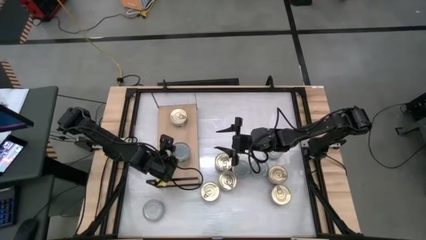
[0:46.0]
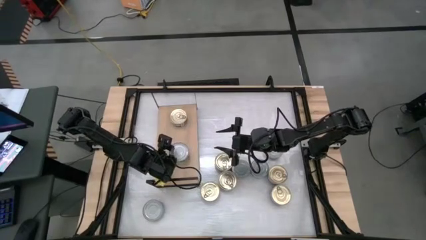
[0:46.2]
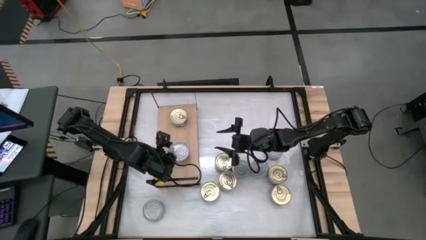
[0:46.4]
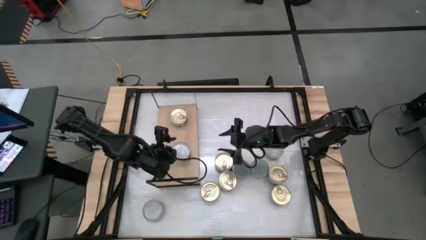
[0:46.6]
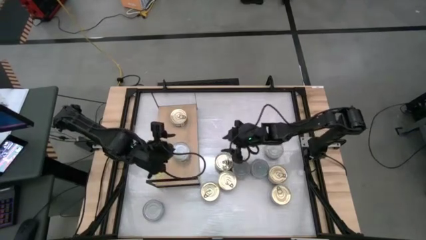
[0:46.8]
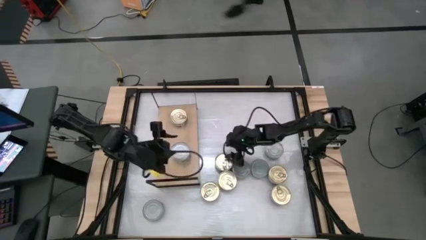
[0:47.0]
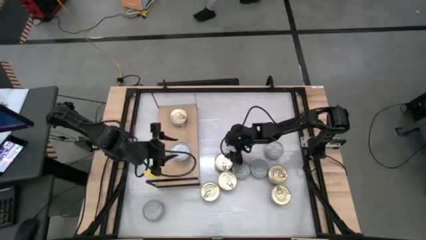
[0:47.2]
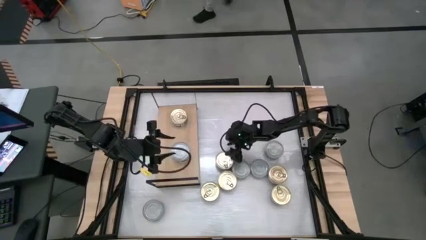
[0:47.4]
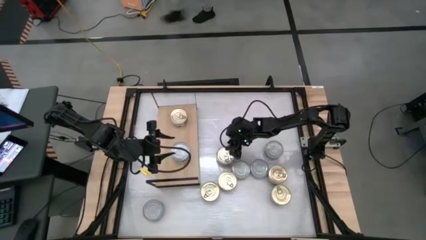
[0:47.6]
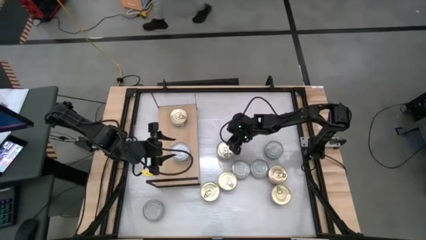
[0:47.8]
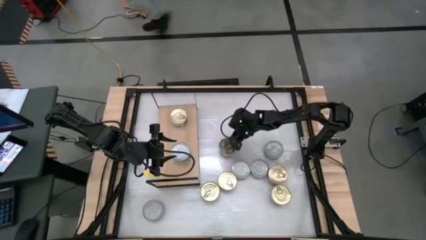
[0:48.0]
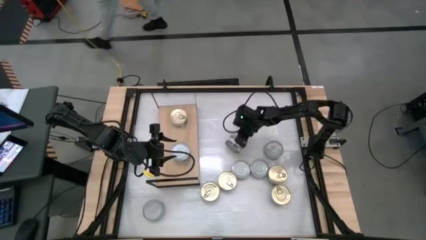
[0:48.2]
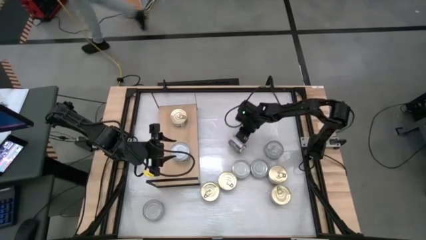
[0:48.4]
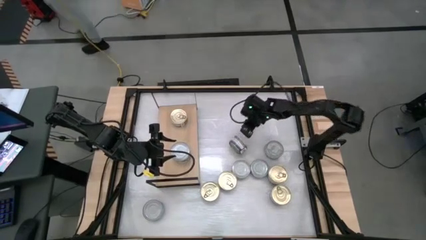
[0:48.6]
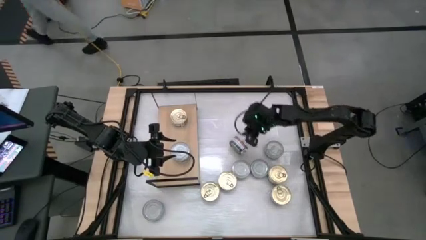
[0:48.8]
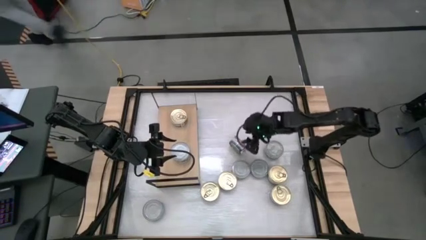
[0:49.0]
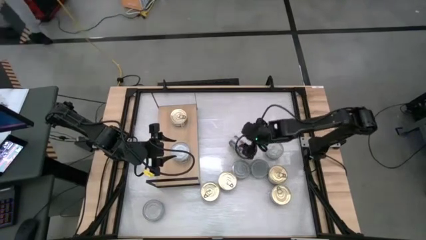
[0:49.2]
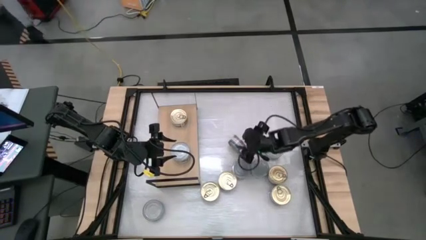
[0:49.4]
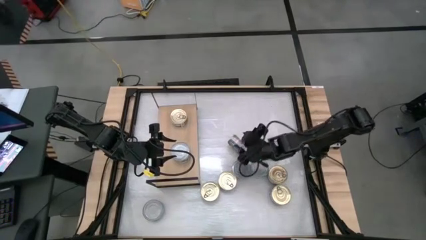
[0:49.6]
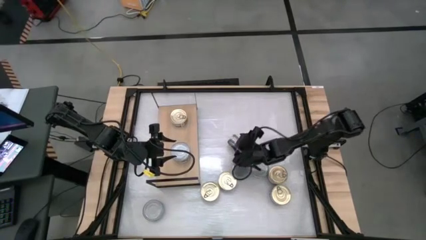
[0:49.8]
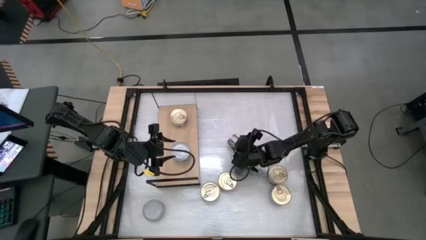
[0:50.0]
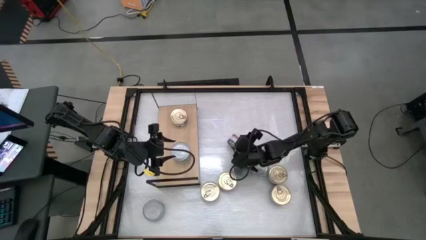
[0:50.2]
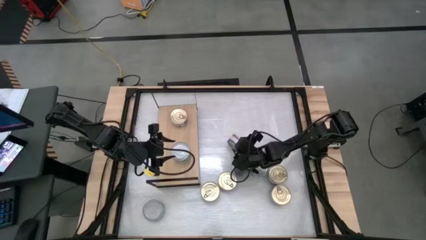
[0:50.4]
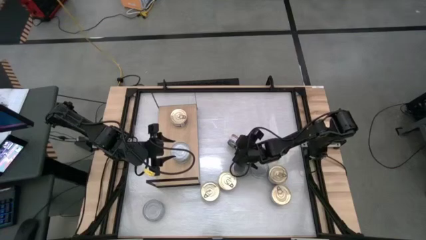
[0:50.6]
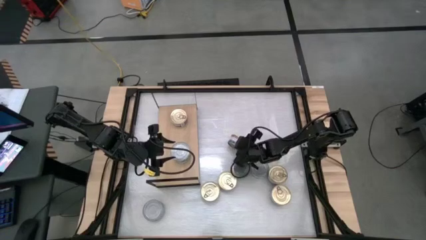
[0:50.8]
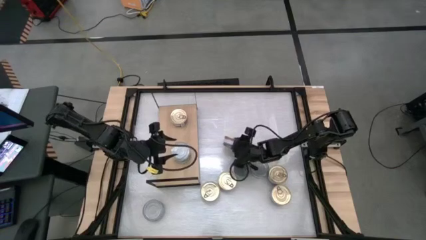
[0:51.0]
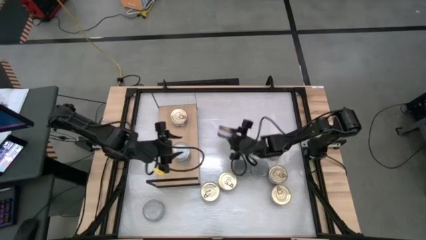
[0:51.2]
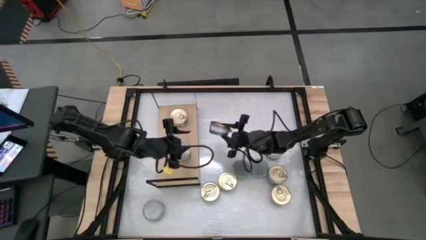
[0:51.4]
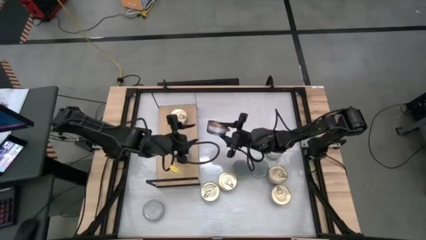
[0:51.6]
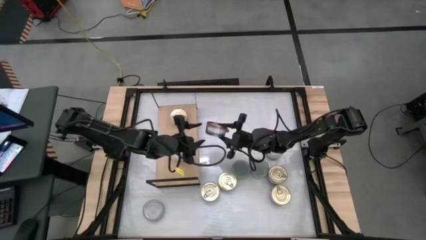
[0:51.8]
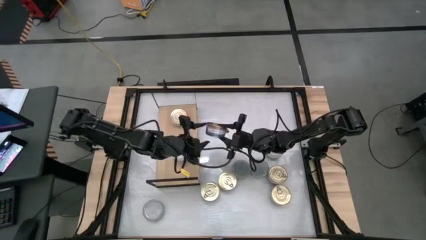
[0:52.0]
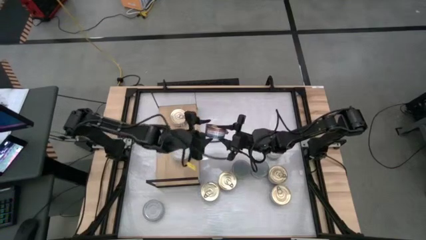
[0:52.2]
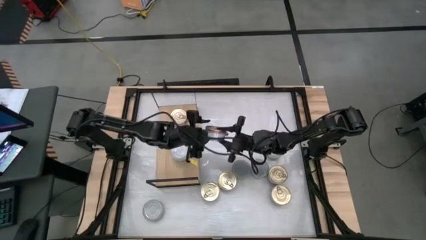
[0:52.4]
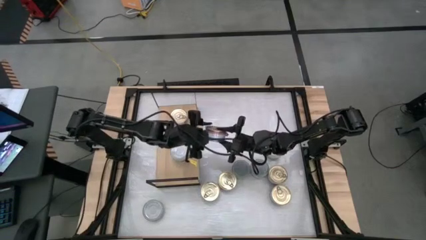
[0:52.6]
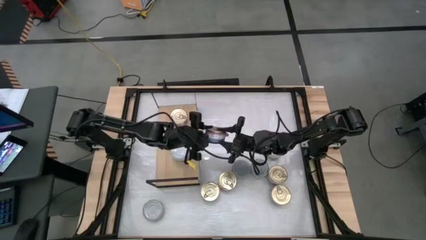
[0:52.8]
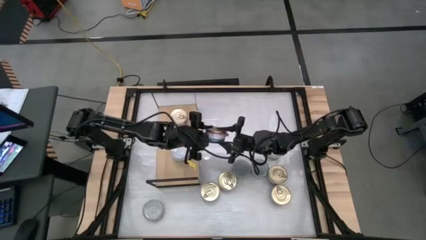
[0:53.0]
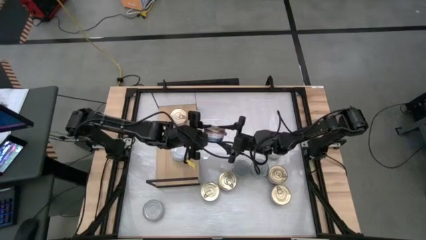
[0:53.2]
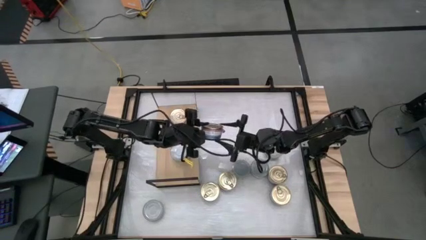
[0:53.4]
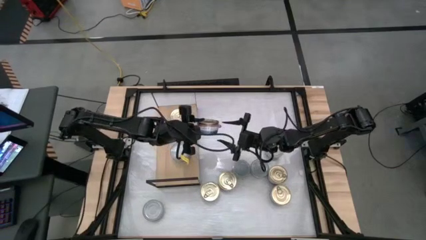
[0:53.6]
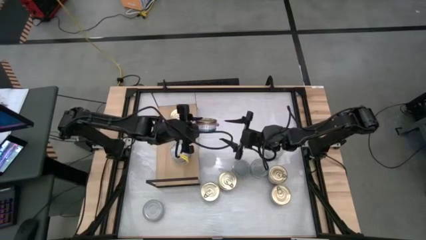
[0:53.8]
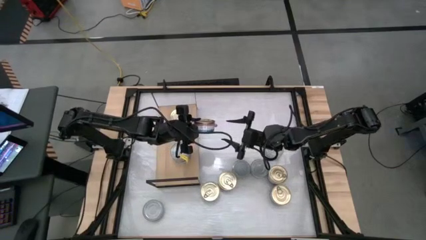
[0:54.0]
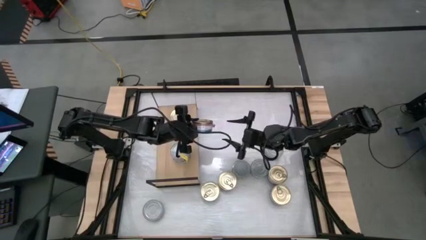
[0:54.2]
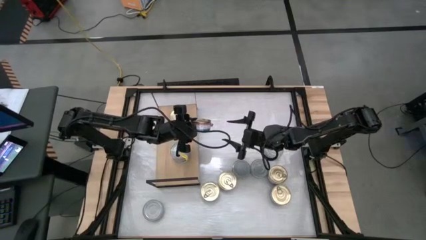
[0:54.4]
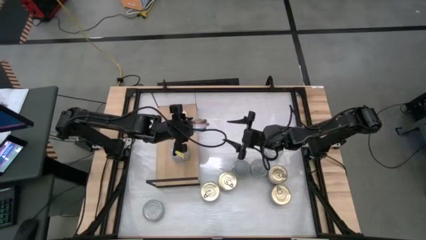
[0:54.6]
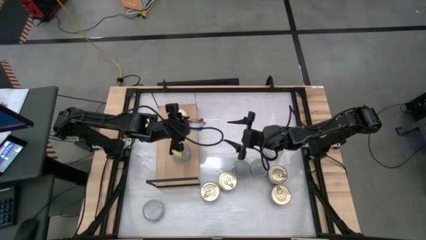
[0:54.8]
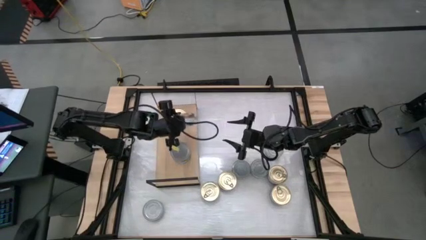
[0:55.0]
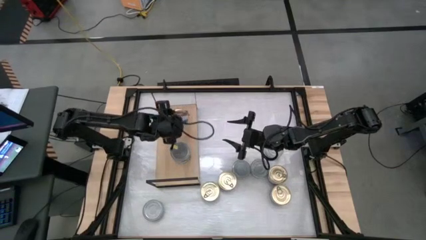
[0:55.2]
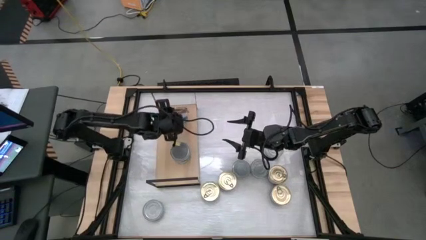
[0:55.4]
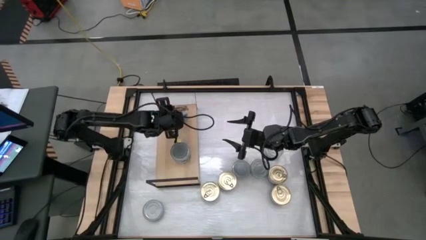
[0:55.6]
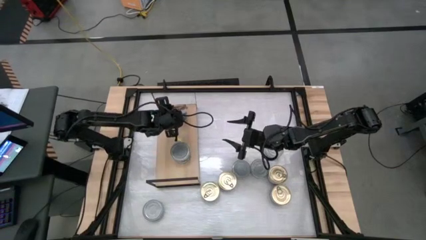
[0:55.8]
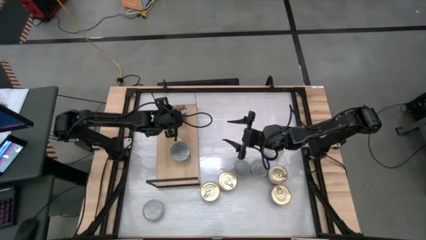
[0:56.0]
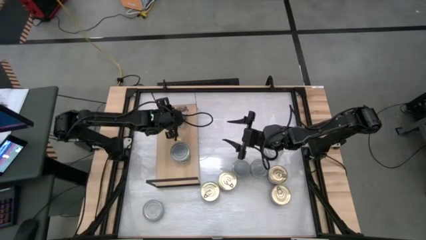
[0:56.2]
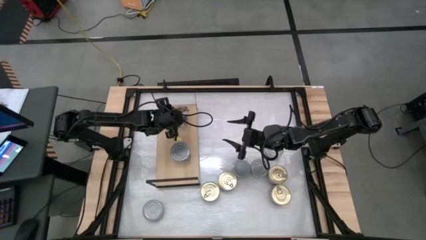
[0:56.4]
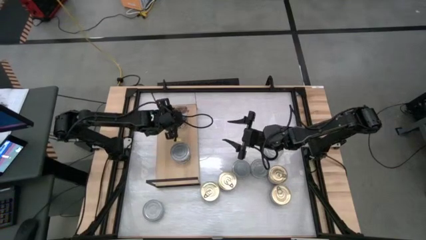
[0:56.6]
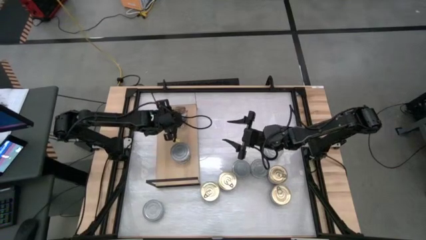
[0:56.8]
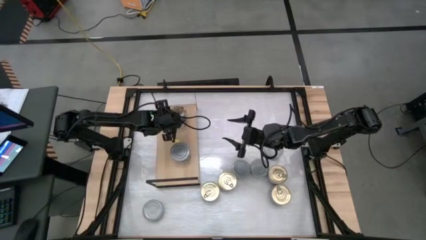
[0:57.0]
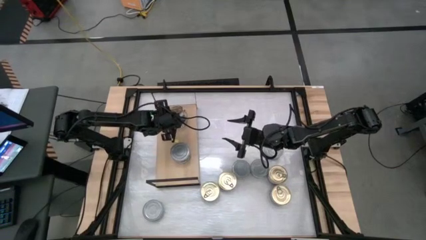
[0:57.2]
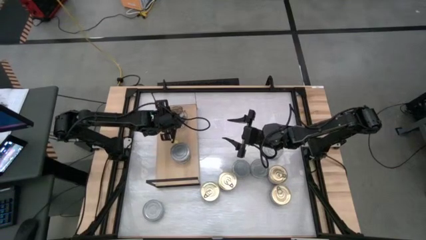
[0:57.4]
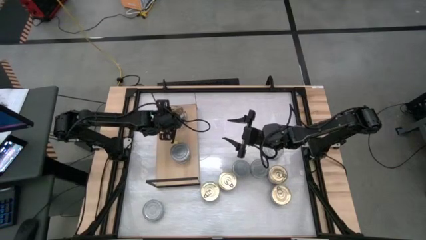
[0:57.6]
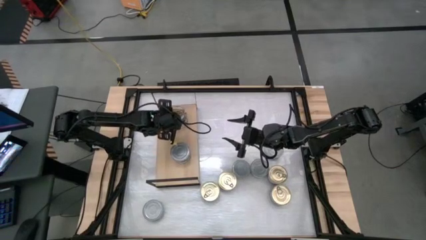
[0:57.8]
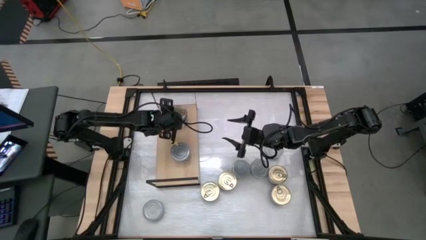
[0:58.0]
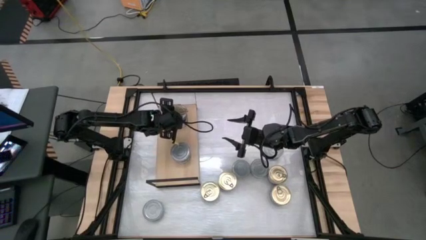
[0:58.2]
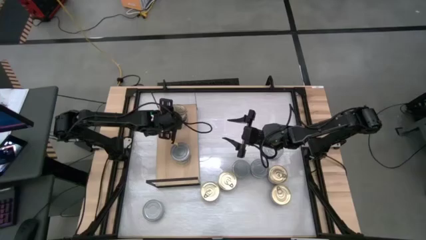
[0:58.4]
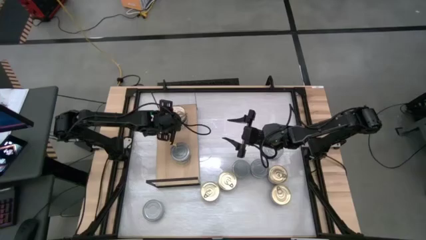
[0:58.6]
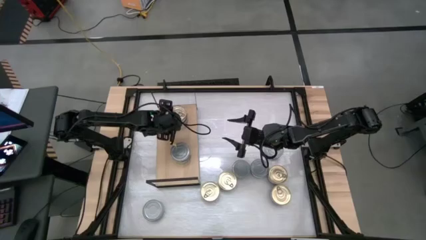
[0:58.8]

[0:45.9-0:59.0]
Task: Stack canned seafood by type on shelf
Stack the blue-pink tuna can on top of the other blue-pink tuna can on the shelf

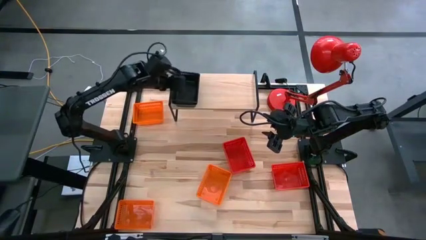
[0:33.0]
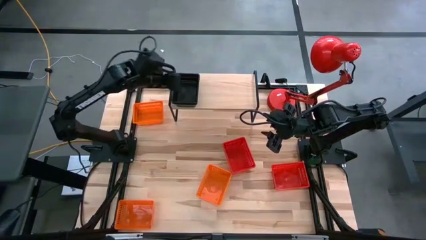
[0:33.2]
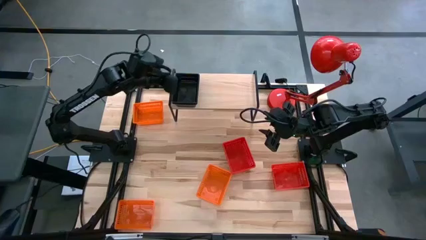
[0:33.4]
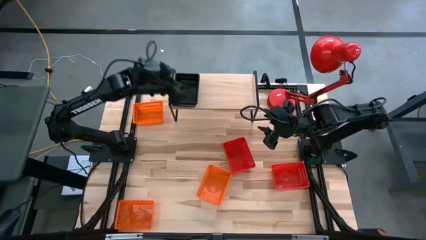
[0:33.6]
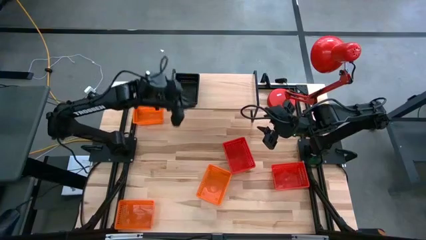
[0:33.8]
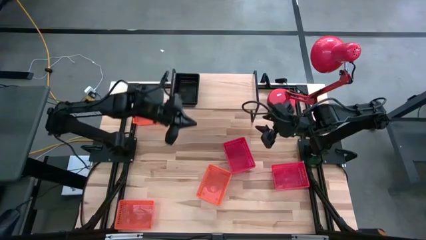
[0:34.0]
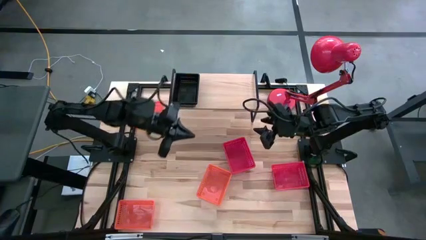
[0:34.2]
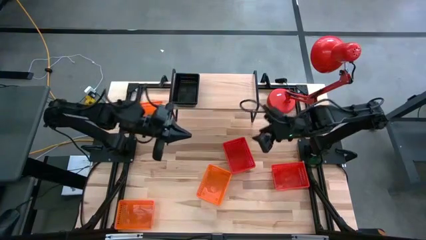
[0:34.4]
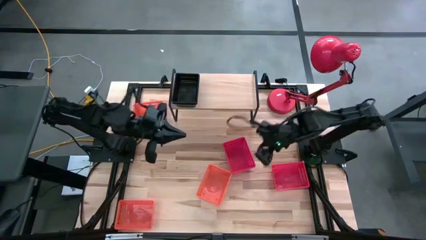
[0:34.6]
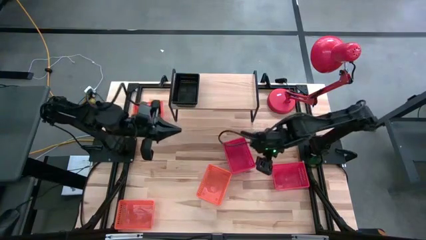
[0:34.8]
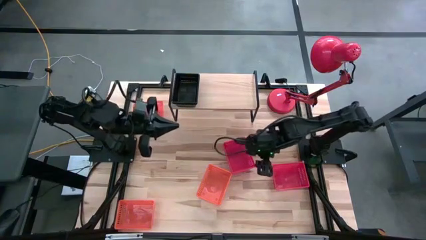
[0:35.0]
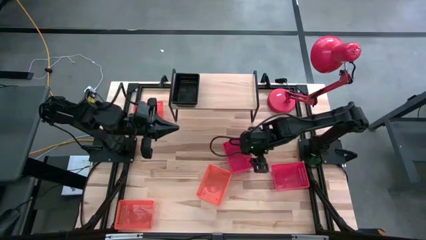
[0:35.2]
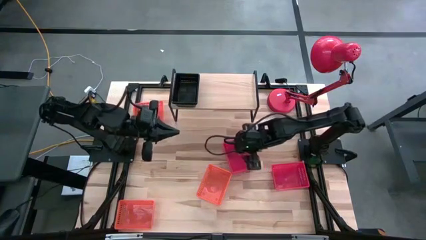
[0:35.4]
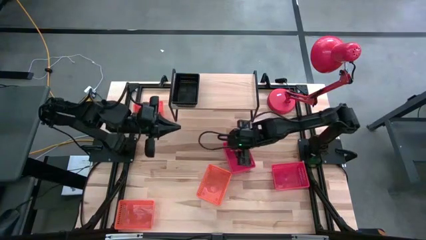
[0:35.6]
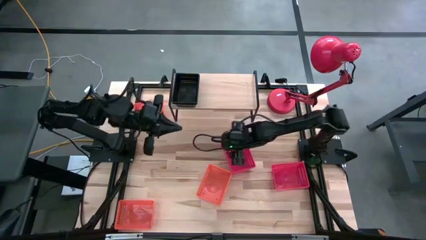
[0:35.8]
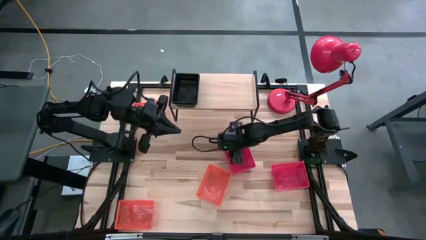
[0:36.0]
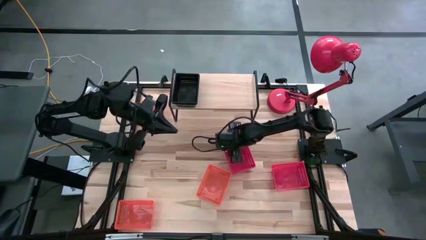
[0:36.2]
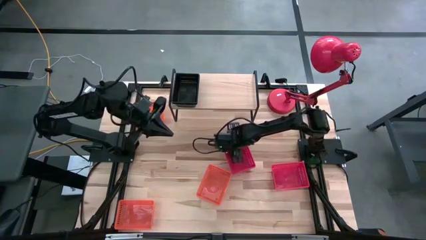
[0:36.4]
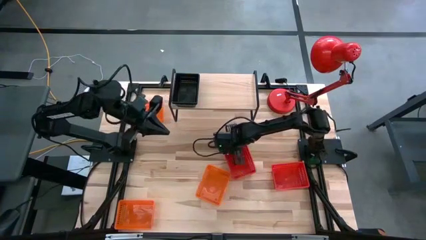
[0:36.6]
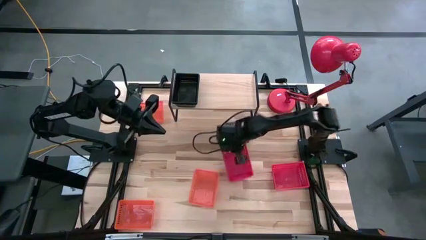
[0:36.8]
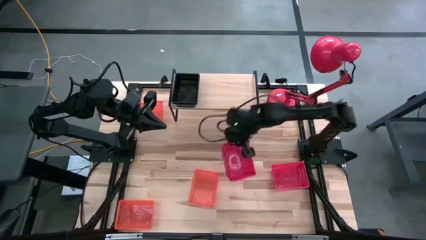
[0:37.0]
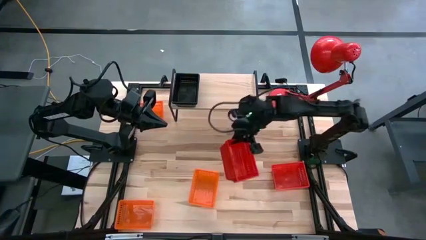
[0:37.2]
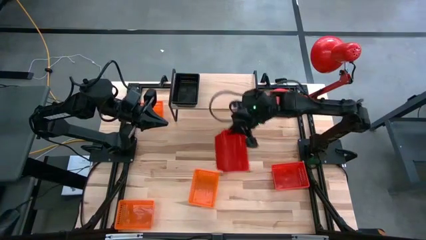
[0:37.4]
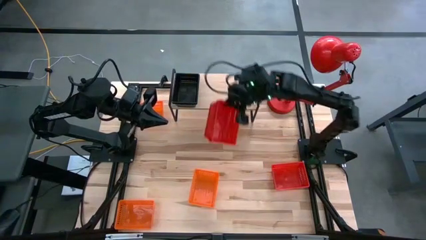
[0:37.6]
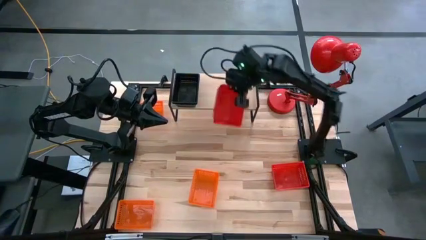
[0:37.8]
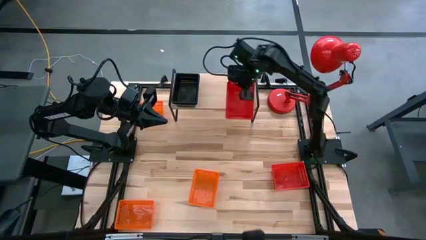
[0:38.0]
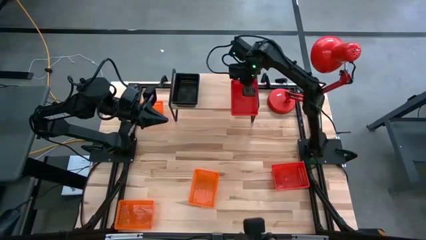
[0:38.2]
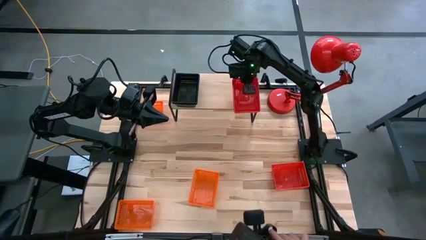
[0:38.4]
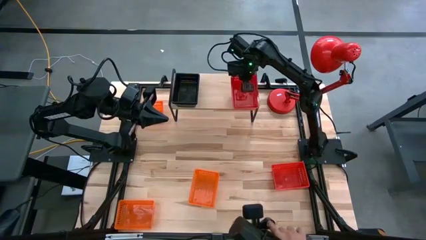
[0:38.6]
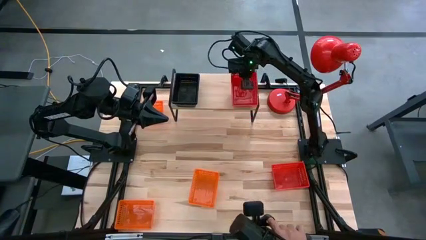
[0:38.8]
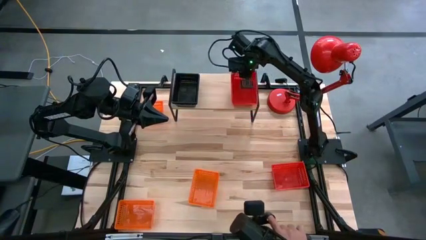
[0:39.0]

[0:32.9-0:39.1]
Task: Stack baskets on shelf by color
Put the left stacked red baskets on the shelf
